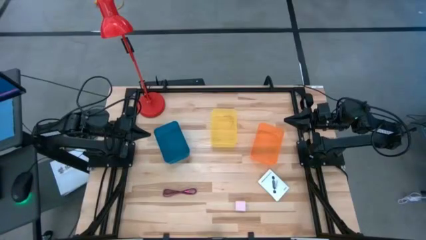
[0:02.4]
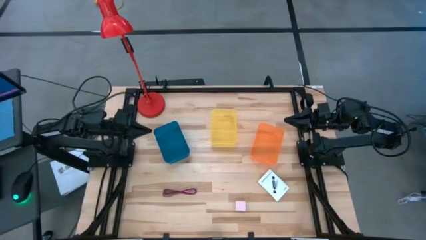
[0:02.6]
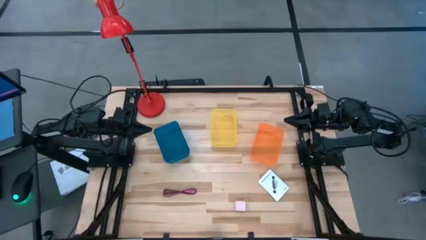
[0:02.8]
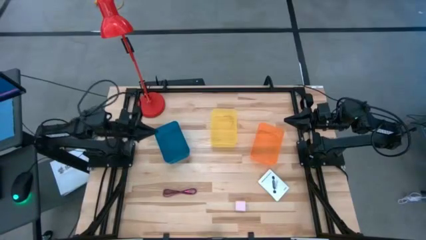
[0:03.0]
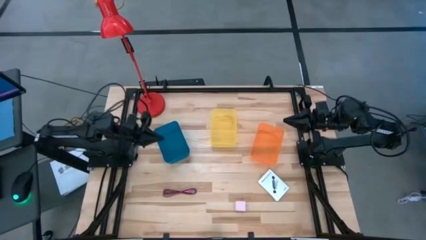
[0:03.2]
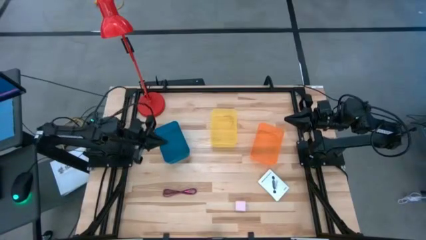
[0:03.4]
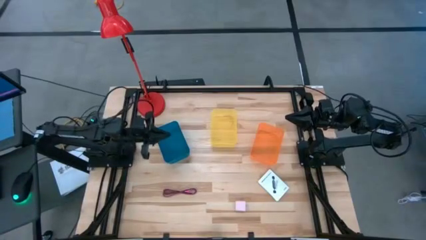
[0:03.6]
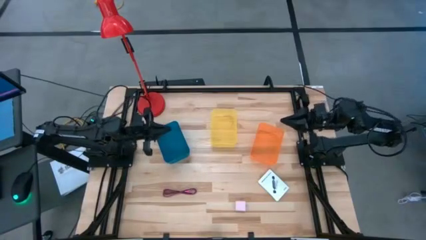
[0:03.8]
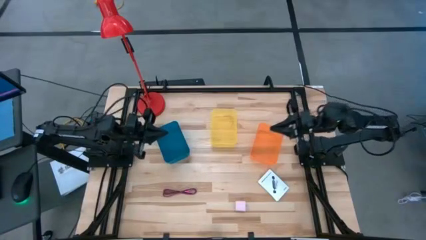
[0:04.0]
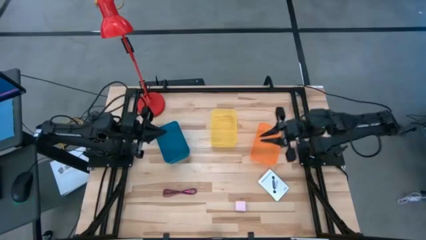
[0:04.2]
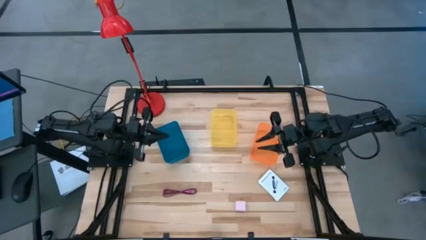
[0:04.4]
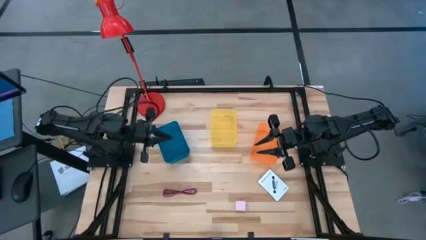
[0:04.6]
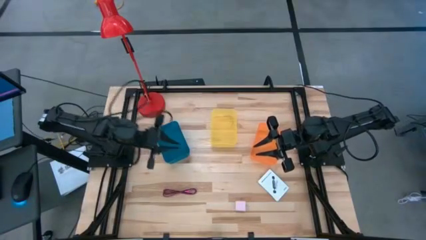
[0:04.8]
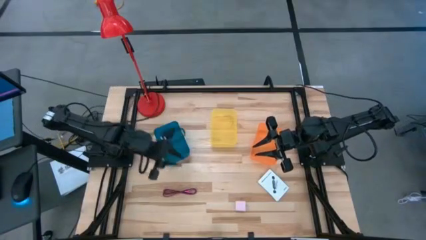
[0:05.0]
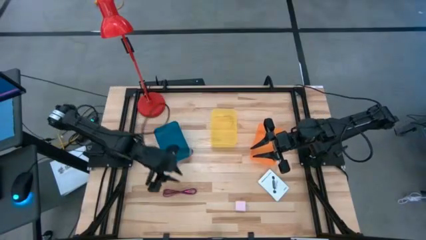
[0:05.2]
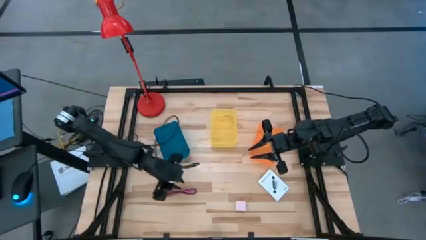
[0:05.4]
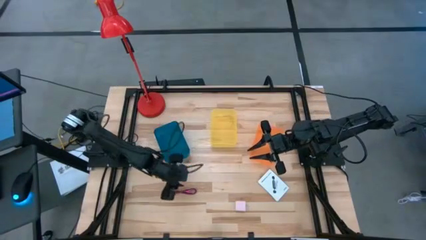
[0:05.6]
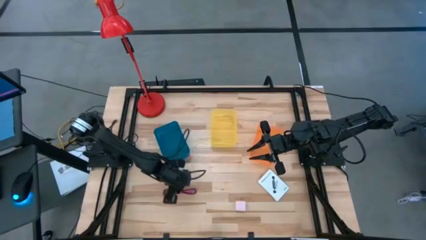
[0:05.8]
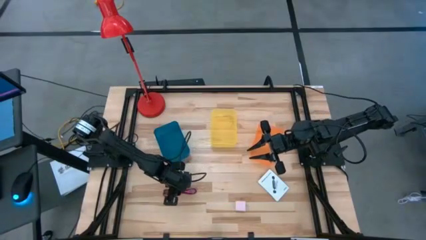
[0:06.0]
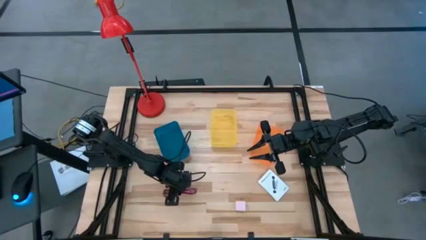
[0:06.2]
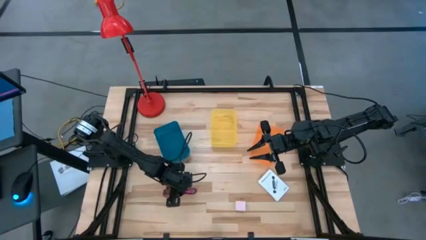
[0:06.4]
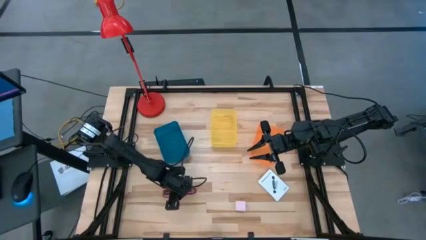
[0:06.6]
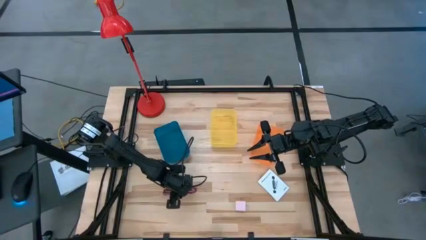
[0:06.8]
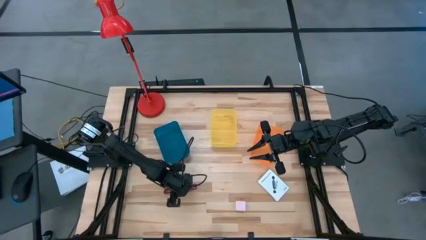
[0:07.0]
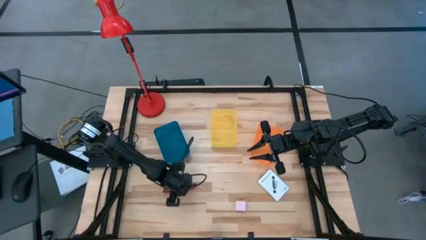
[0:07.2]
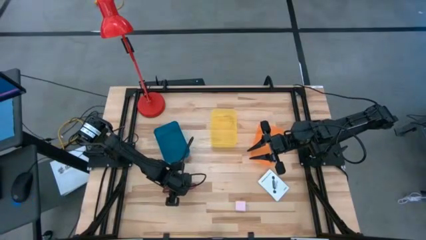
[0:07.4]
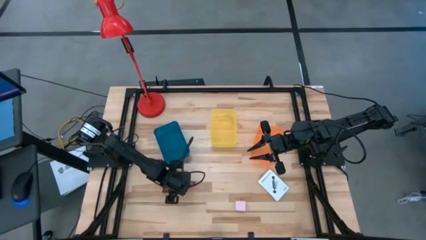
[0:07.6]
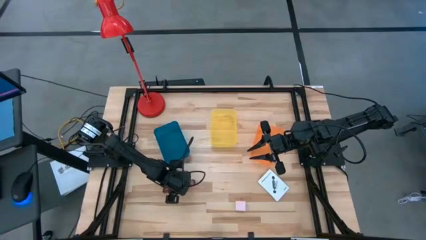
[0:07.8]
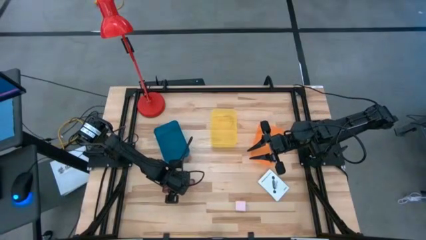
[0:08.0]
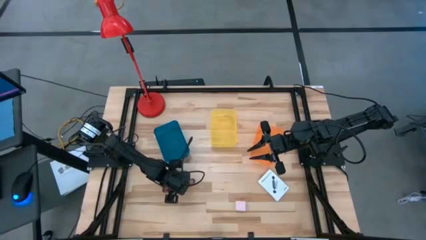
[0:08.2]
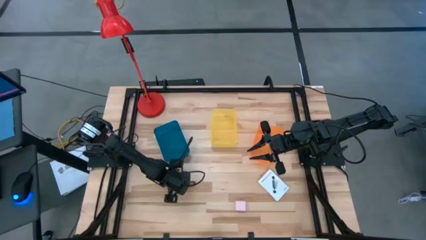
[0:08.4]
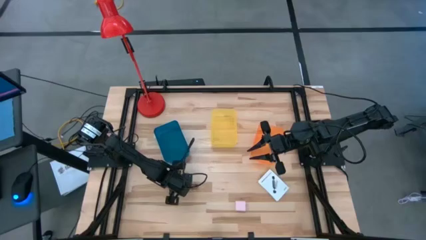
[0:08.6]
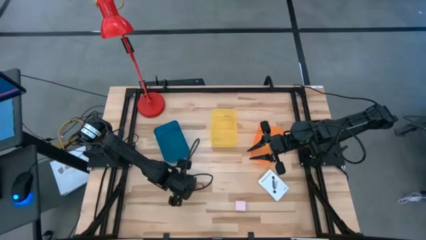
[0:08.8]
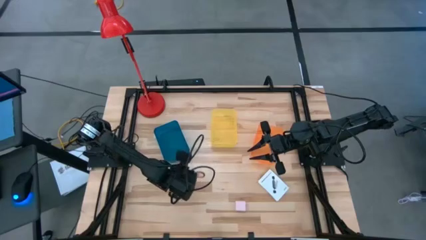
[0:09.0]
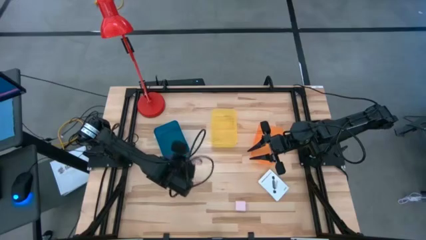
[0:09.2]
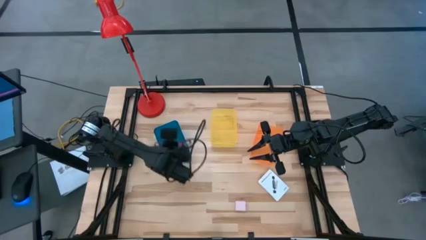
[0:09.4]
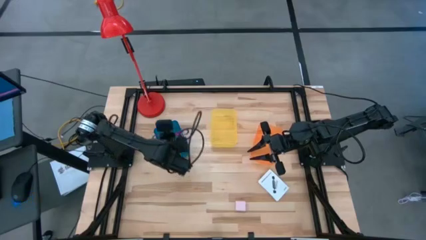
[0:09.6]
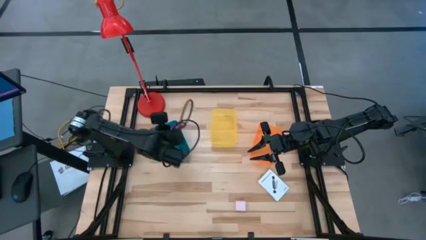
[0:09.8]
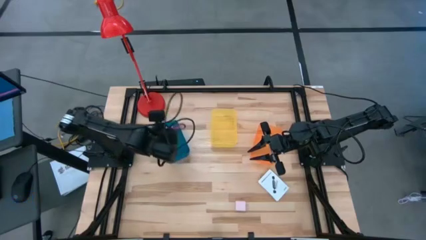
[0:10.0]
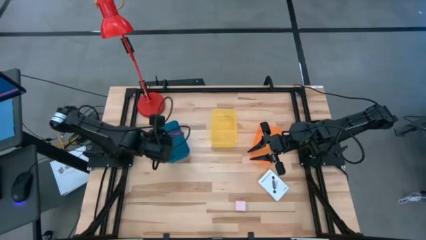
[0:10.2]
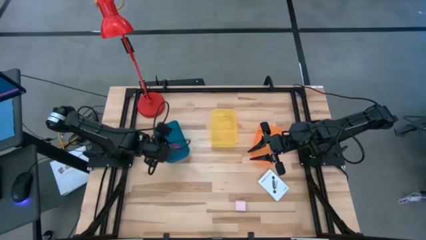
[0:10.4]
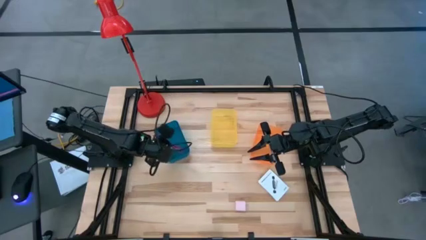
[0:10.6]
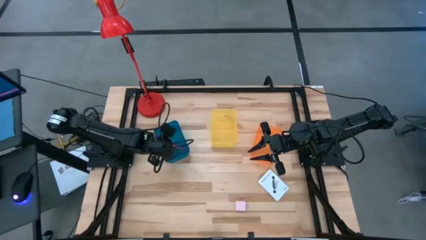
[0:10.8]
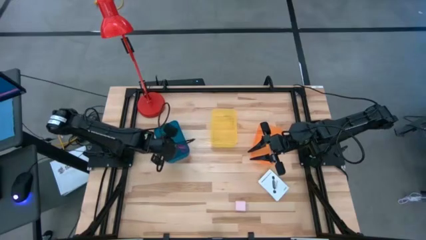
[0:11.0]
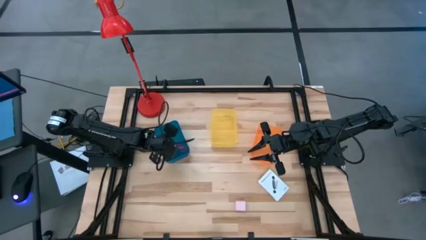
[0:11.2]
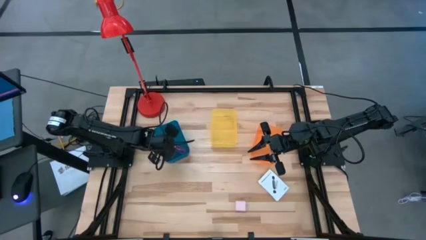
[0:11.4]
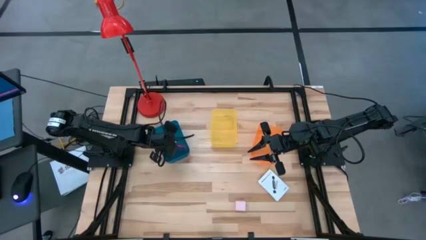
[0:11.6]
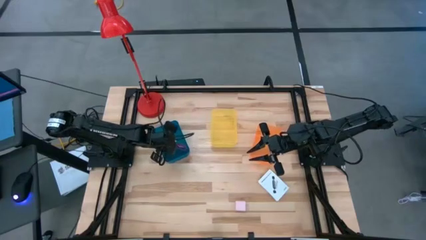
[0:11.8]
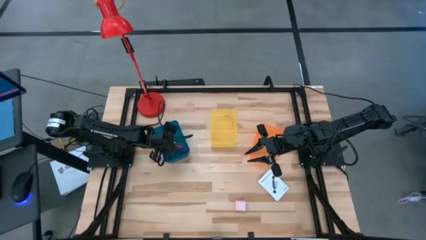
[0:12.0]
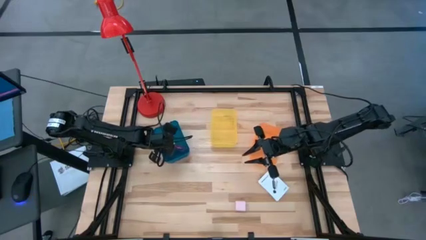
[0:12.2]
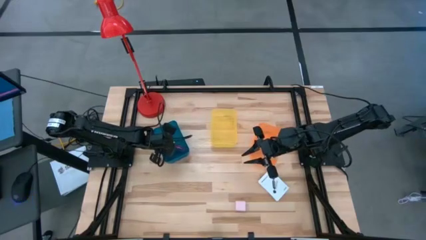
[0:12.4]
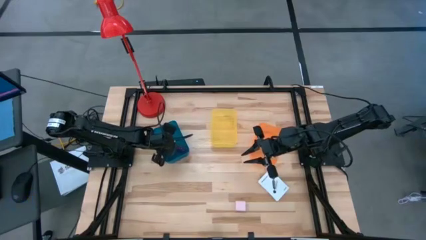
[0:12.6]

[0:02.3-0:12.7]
Task: Pick and place items into bin
Put the pink charger cable into the blue bin

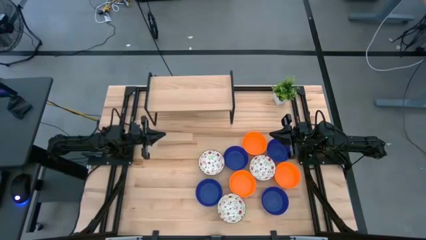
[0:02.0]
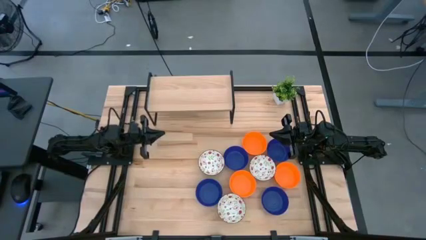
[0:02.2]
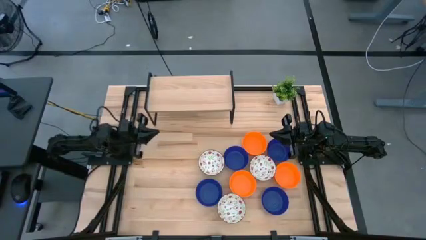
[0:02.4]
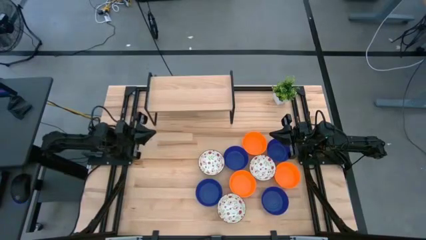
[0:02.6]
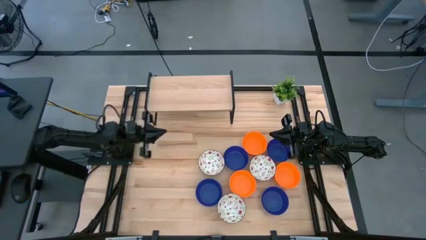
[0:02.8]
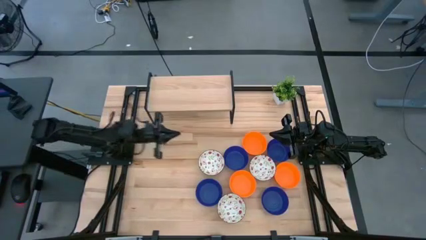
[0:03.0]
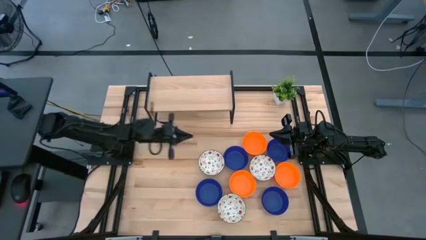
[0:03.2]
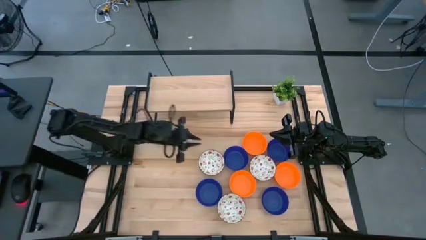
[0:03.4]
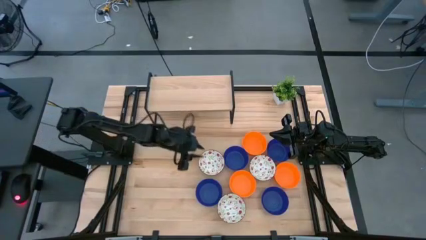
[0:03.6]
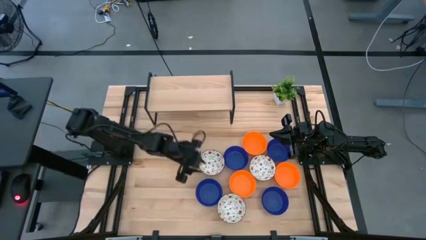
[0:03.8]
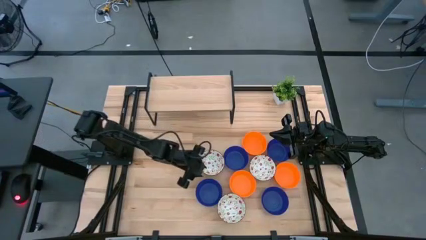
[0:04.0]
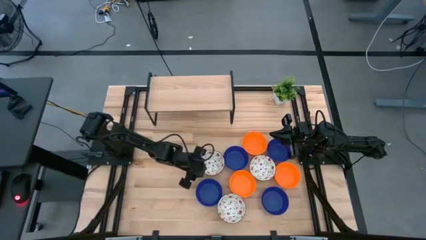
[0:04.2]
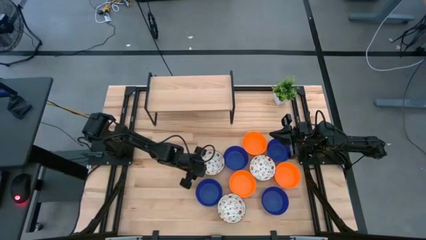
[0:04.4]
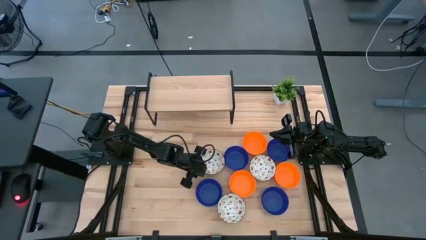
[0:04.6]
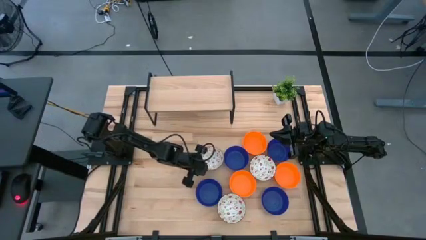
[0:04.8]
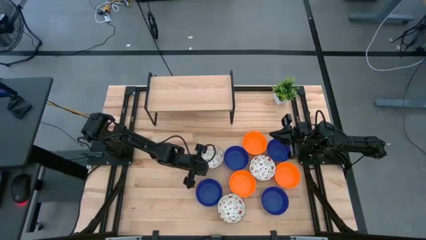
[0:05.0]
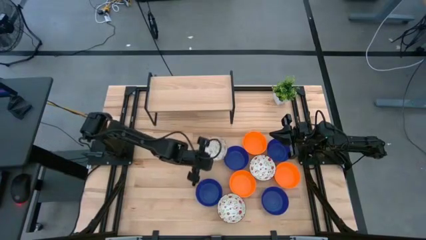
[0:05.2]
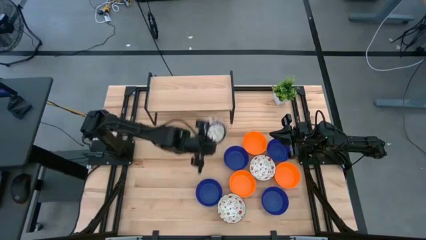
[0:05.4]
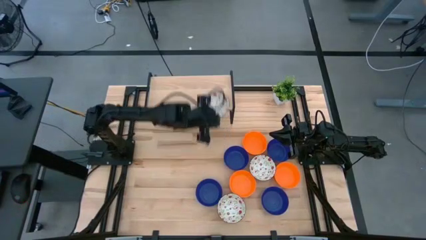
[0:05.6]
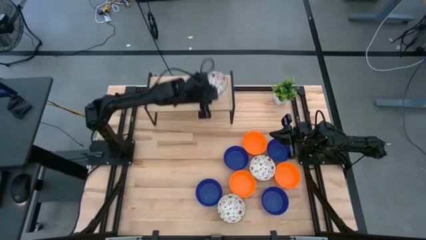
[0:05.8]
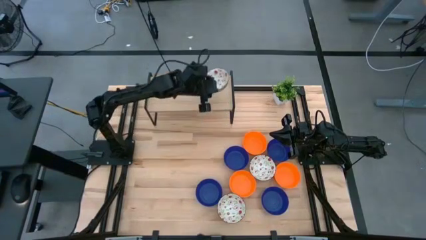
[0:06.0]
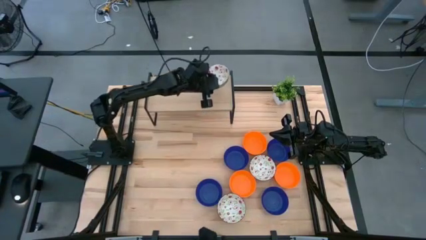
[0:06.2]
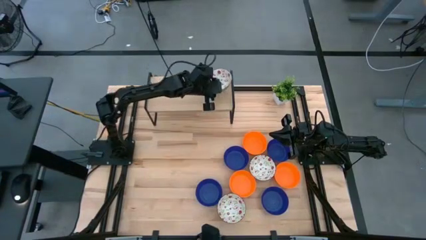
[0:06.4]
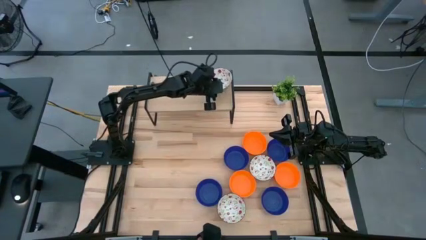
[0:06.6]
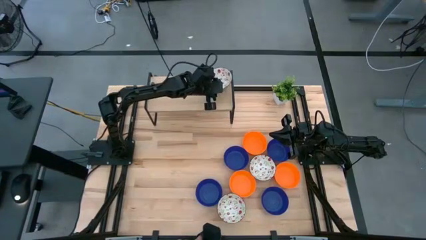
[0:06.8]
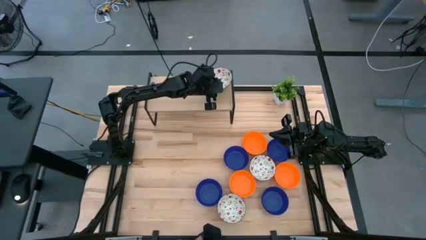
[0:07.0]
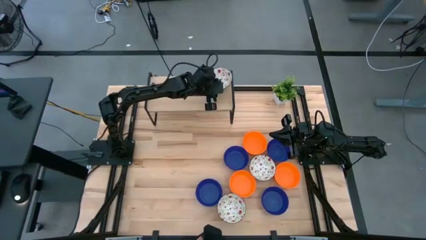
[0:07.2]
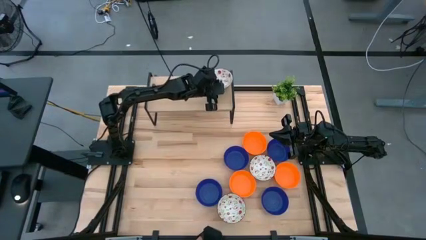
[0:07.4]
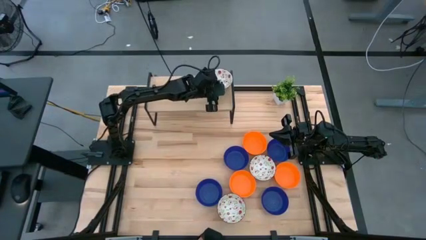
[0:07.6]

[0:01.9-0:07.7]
Task: Pick & Place Mini bowls
Put the top left white bowl on the shelf
